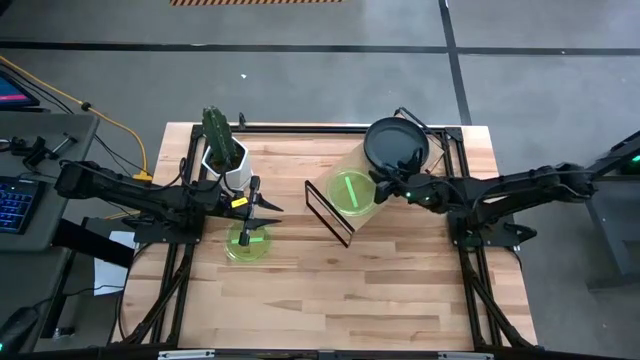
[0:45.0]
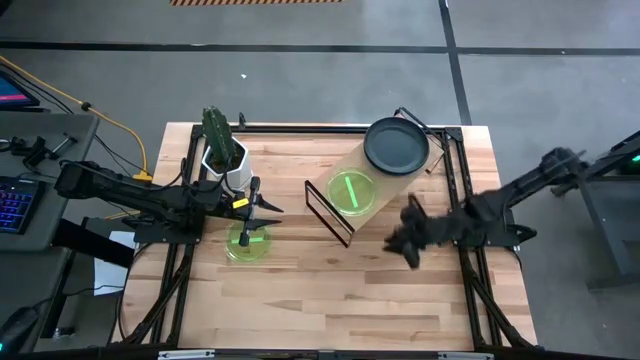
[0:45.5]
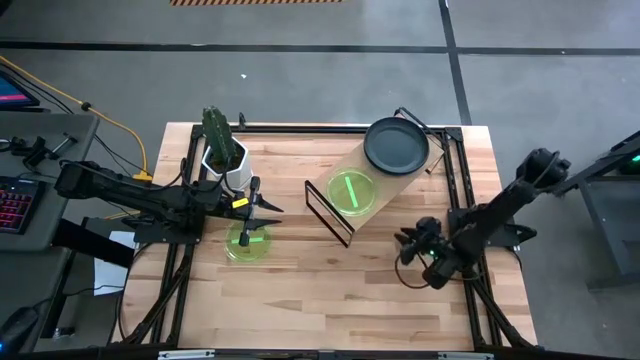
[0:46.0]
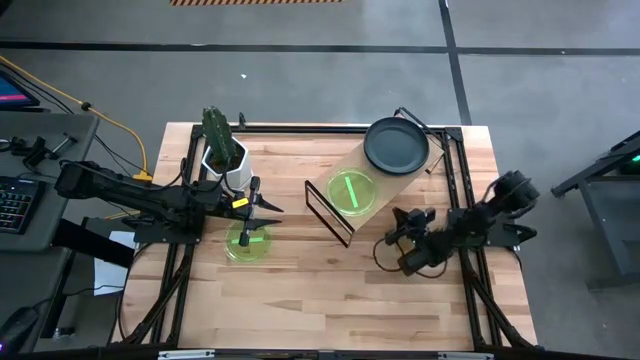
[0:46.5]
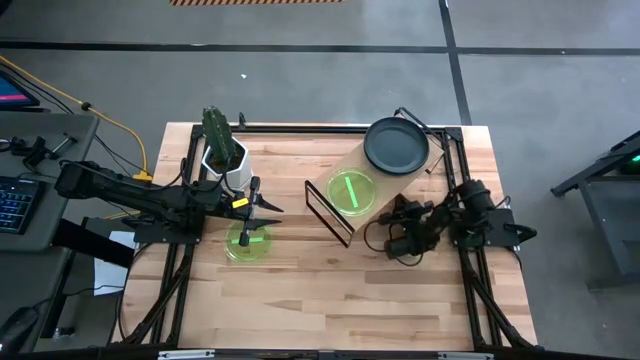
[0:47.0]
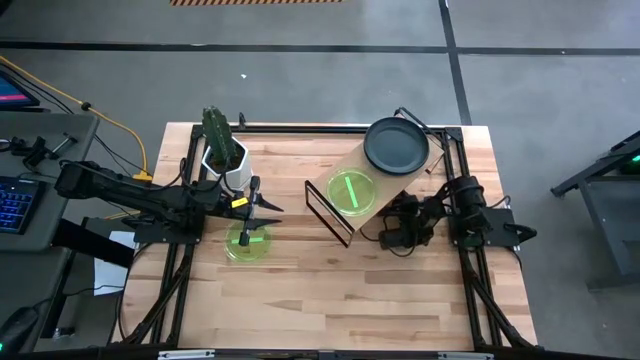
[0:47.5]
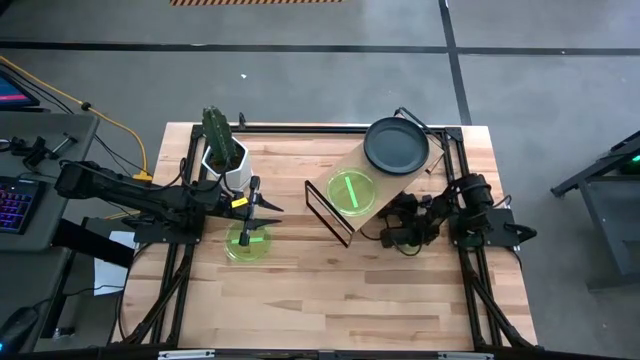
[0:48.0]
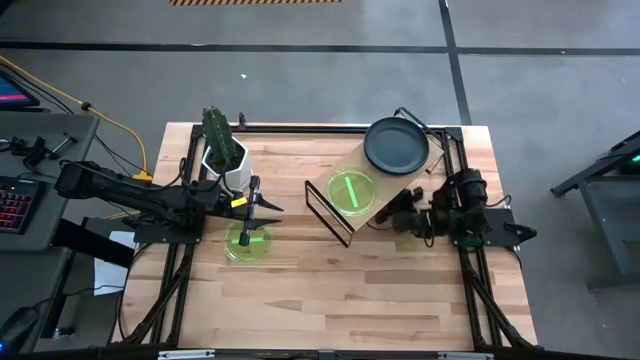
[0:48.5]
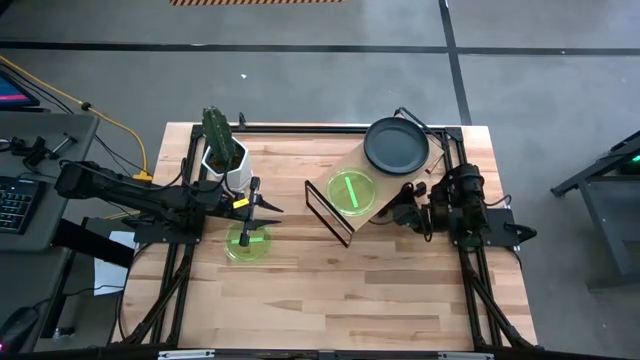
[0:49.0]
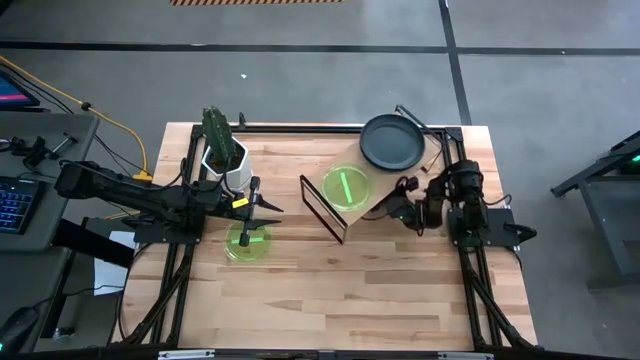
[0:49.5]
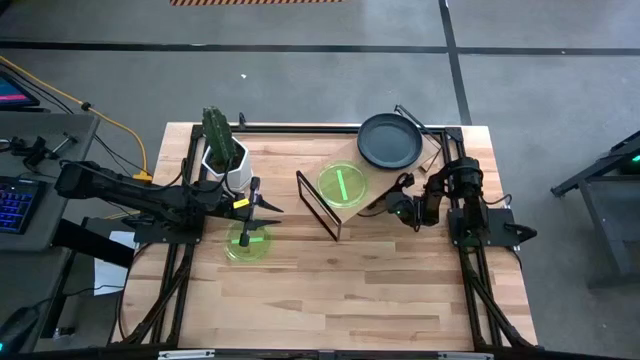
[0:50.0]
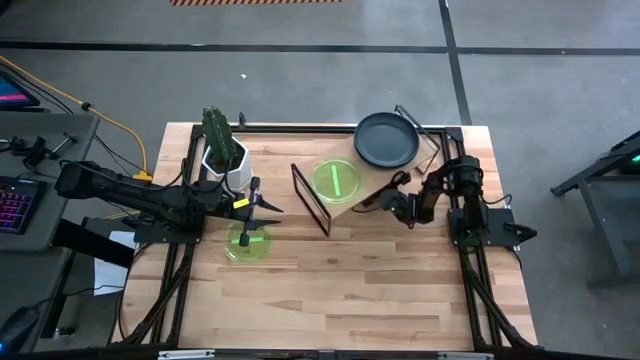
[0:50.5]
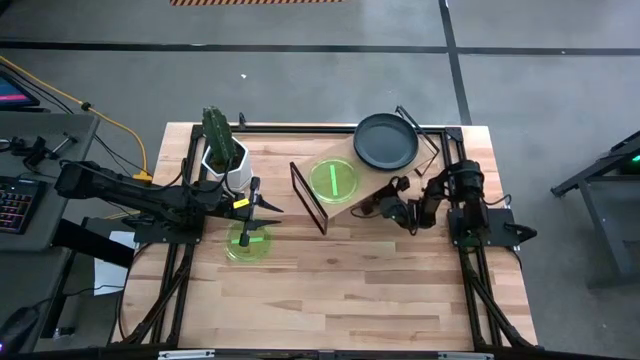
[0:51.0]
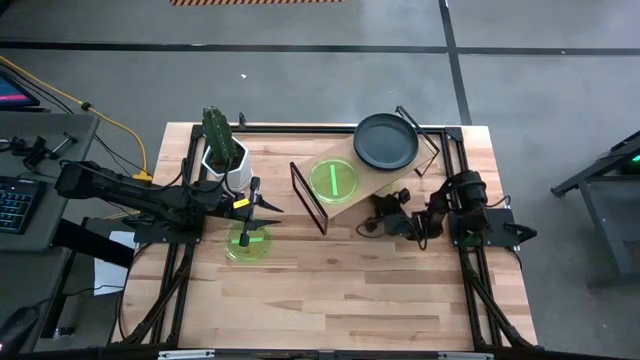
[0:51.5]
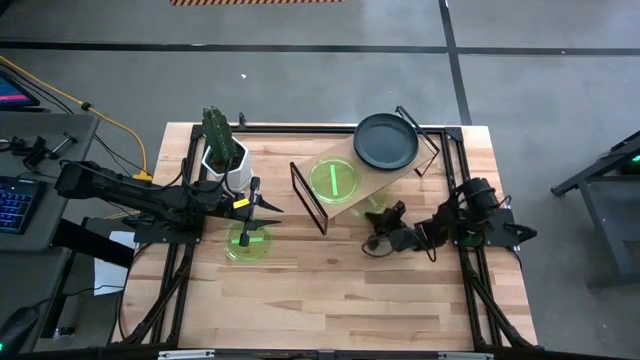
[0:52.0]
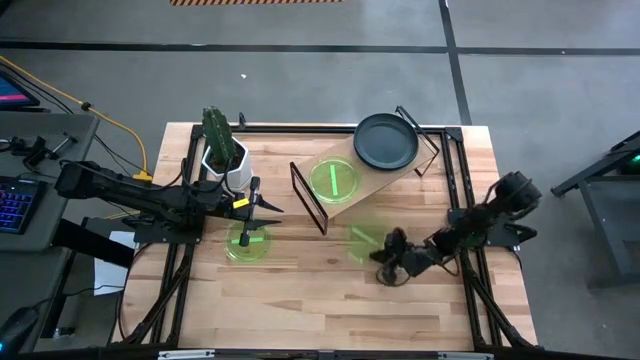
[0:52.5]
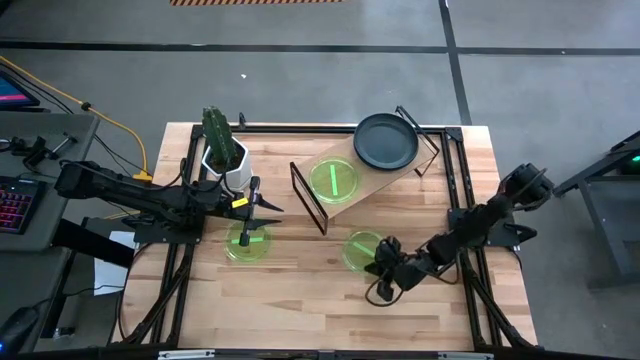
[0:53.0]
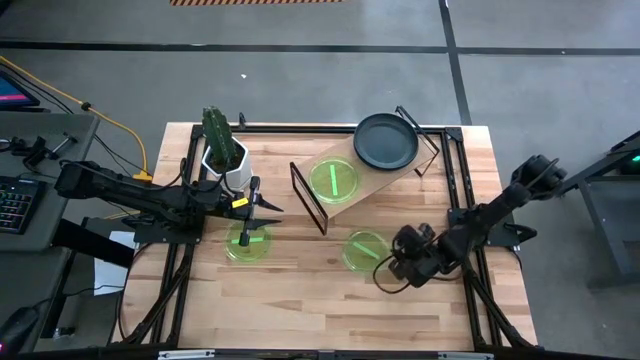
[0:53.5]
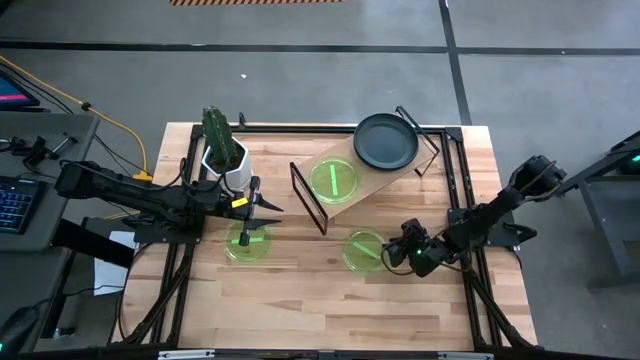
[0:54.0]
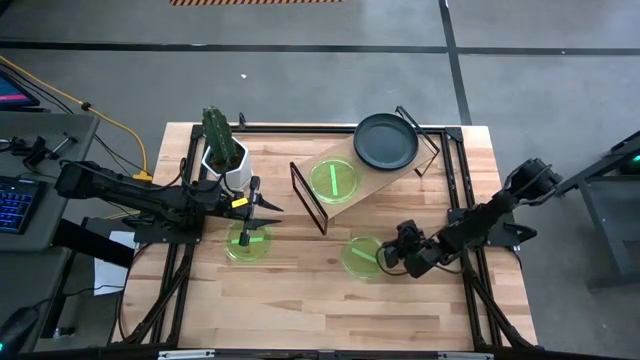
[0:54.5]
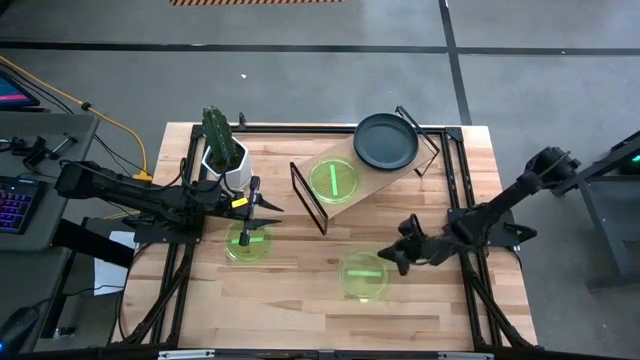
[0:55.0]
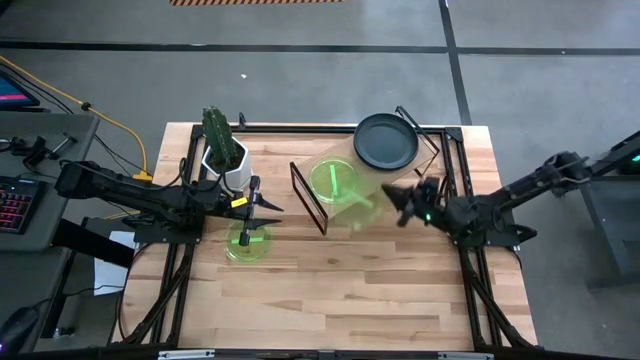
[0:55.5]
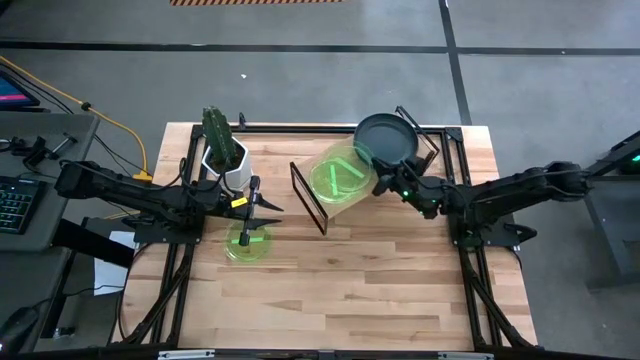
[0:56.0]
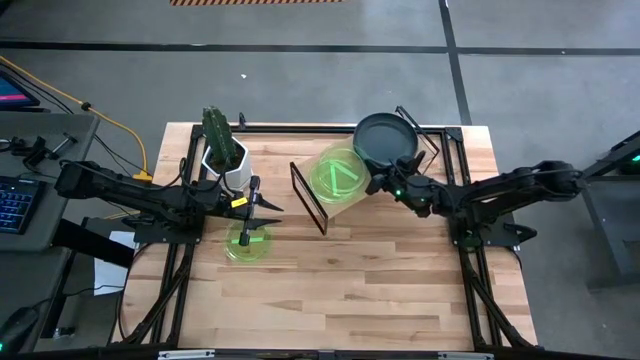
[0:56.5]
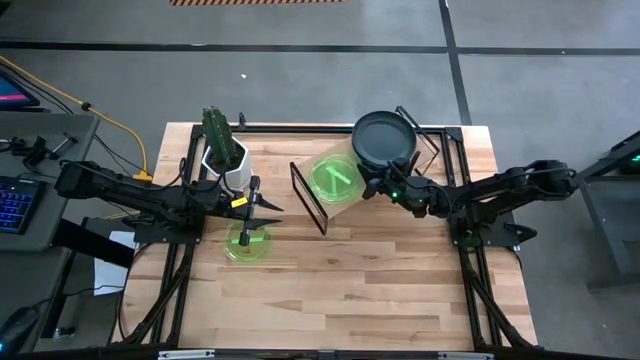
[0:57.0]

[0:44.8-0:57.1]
Task: Place and stack plates onto a shelf
Stack the top green plate on top of the other green plate on the shelf

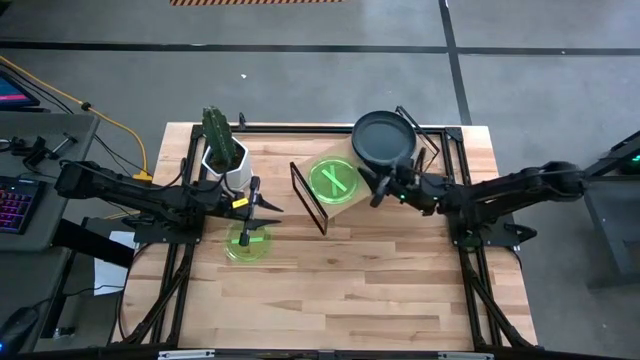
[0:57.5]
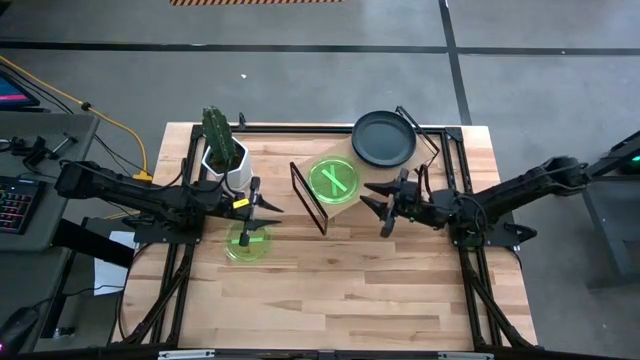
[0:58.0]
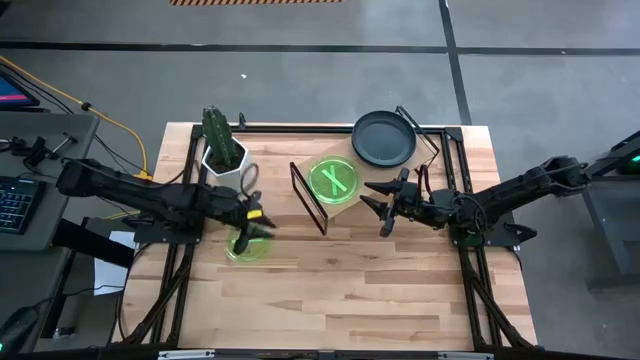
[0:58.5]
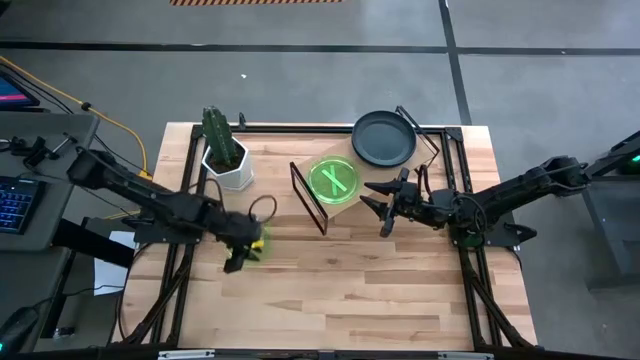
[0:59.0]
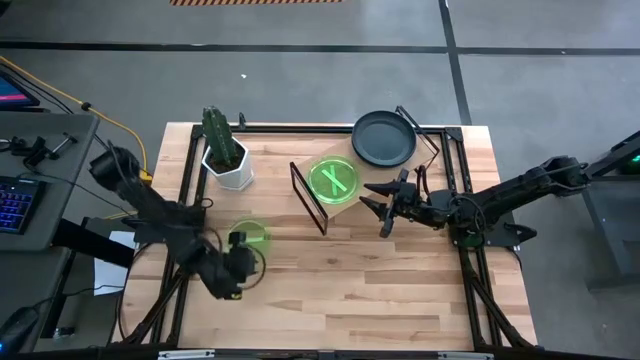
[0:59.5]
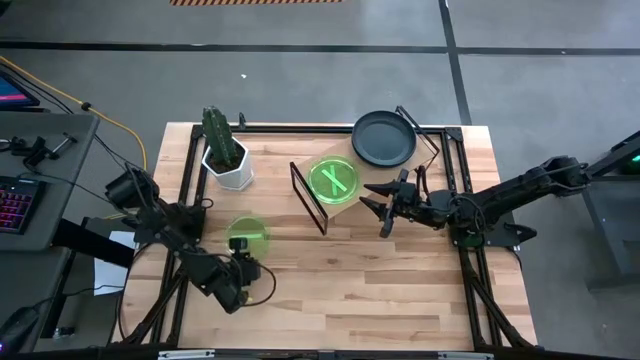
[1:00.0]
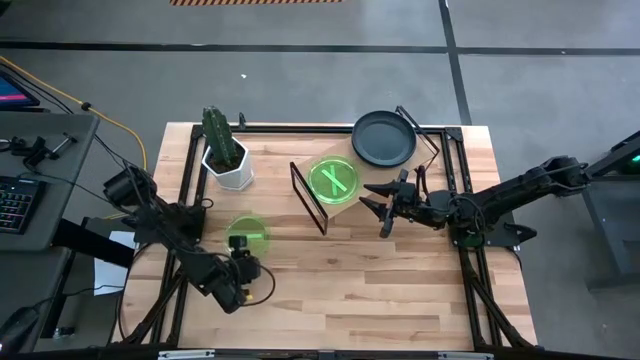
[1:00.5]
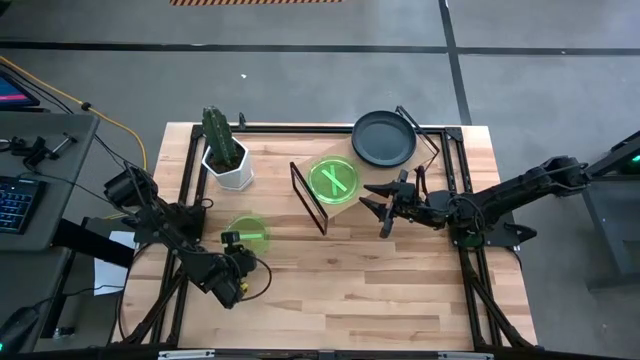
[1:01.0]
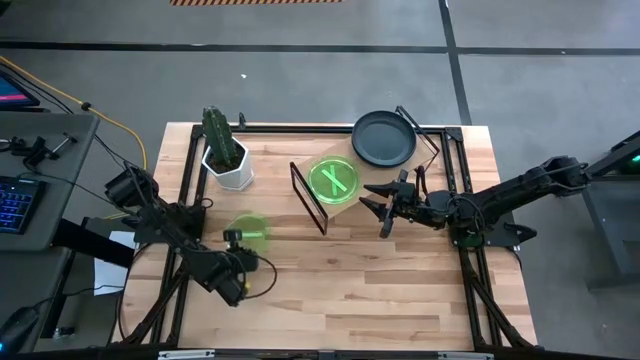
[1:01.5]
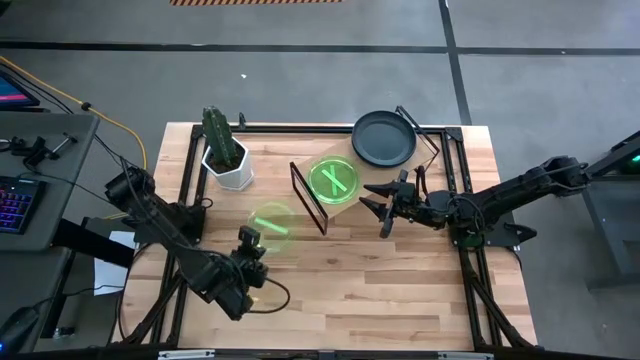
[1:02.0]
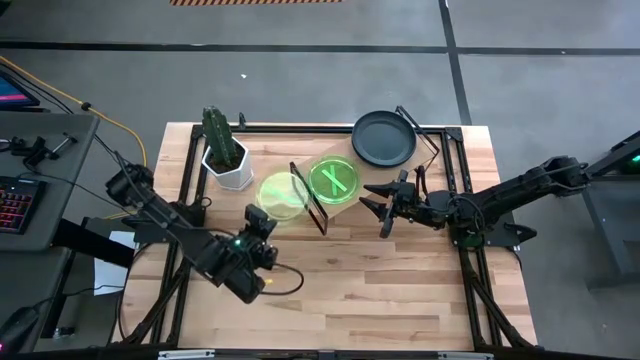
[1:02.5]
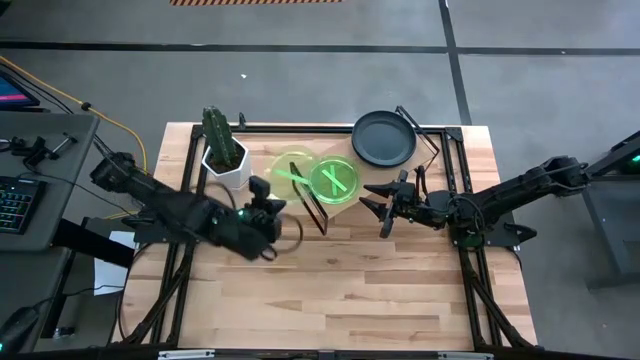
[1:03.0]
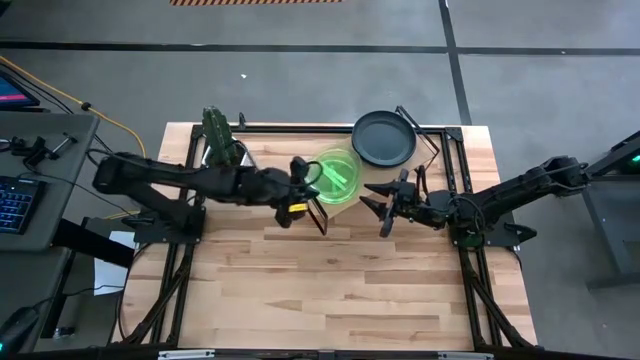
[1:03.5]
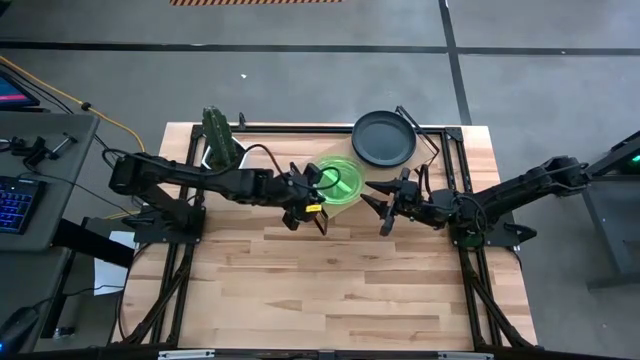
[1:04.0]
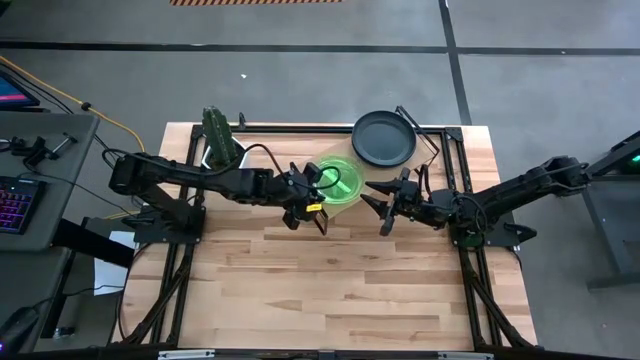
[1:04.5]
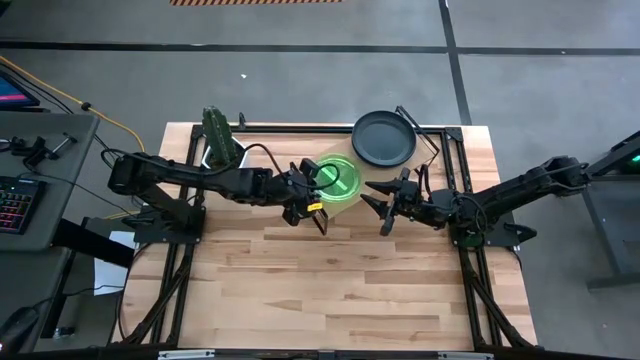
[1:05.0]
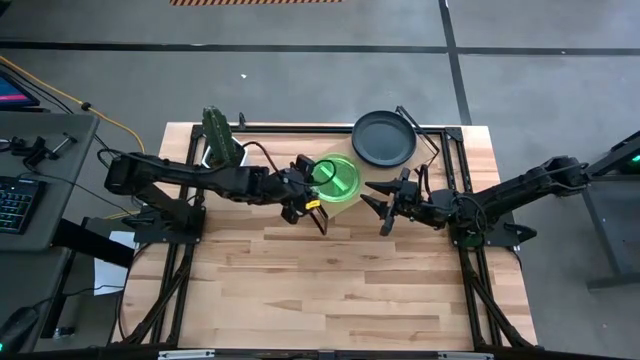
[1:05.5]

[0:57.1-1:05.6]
Stack the green plate on top of the other green plate on the shelf

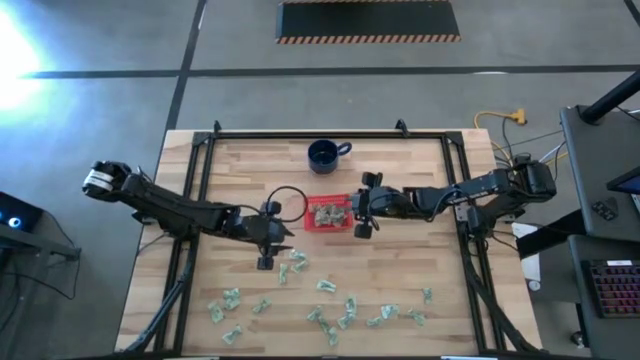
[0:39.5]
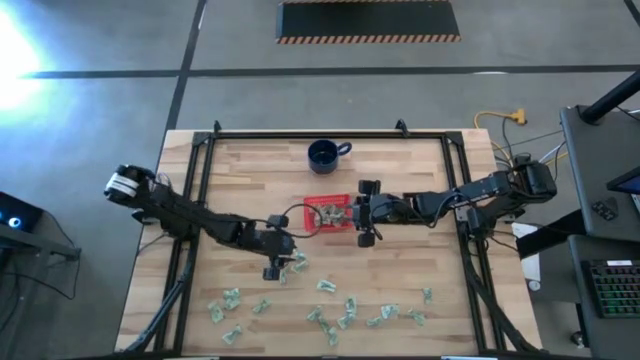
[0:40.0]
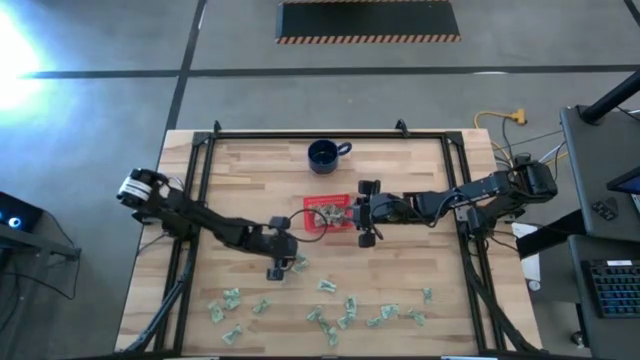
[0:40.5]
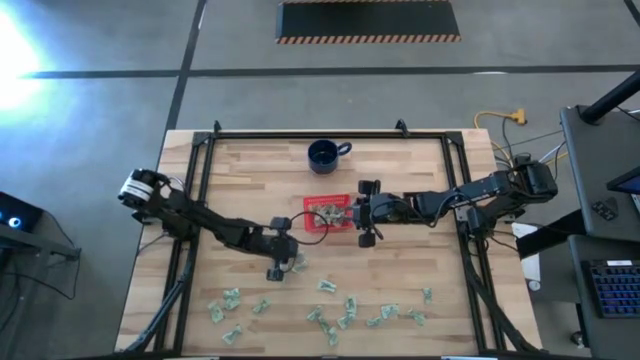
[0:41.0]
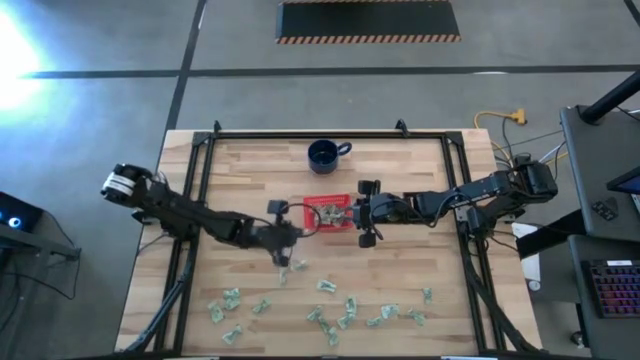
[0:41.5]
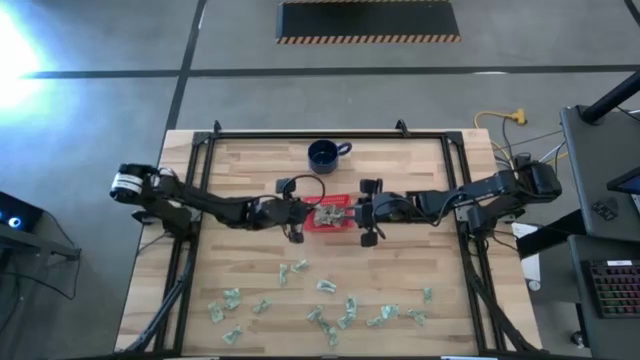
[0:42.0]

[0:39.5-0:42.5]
Task: Pick and place items into bin
Put the stevia packet into the red bin
